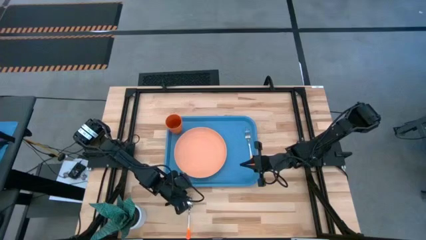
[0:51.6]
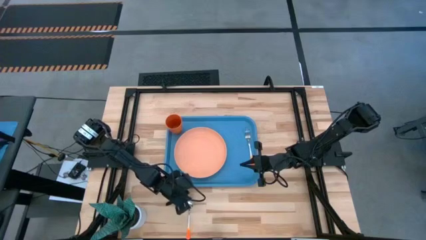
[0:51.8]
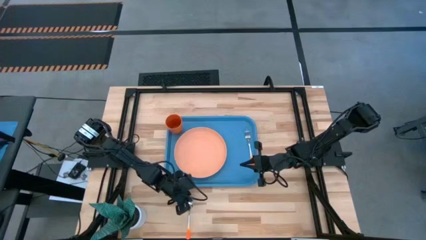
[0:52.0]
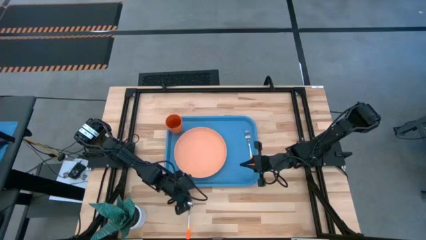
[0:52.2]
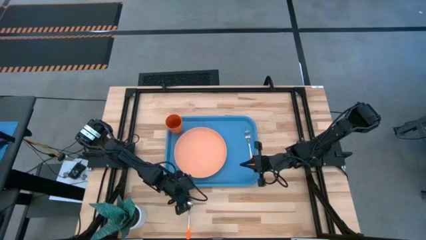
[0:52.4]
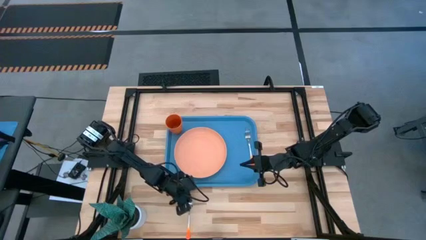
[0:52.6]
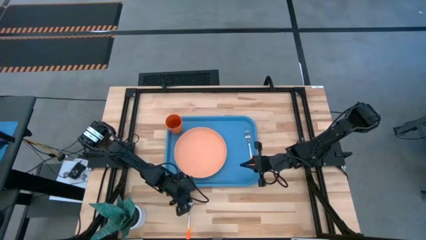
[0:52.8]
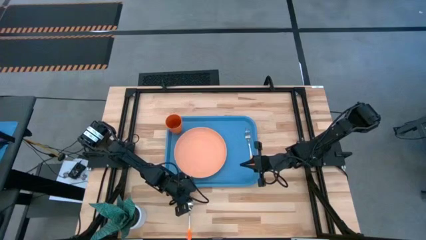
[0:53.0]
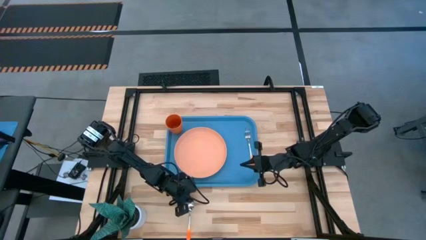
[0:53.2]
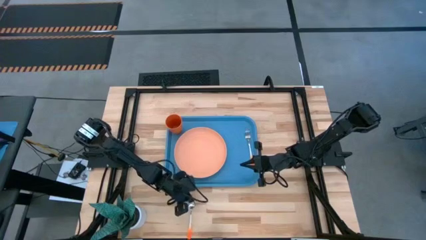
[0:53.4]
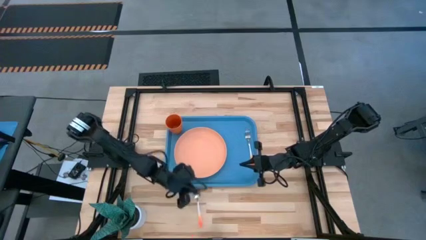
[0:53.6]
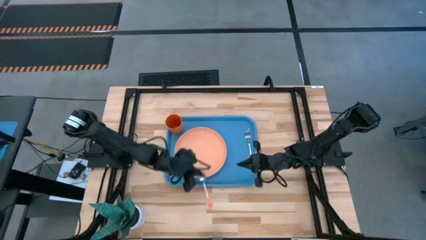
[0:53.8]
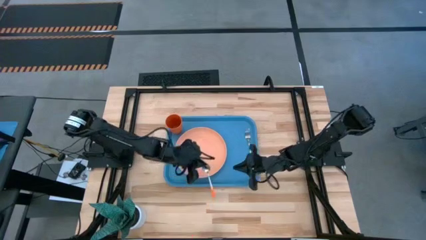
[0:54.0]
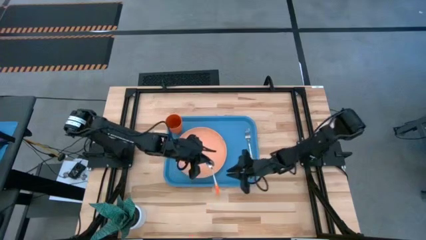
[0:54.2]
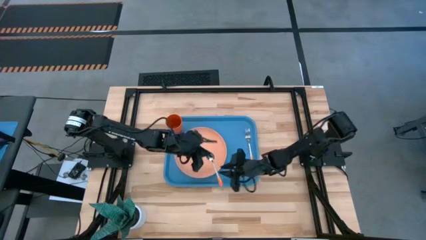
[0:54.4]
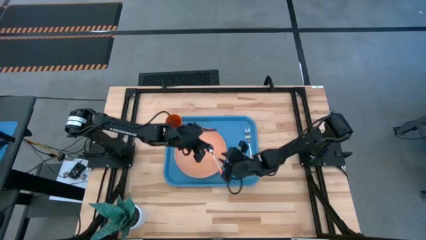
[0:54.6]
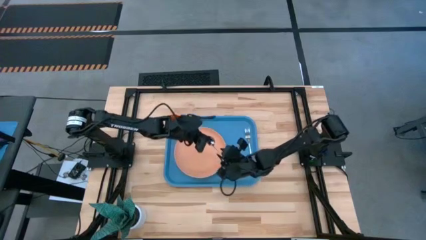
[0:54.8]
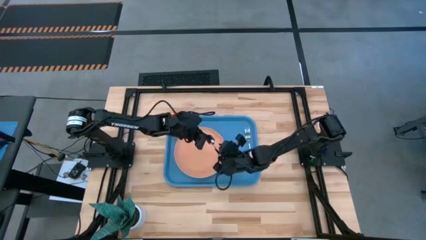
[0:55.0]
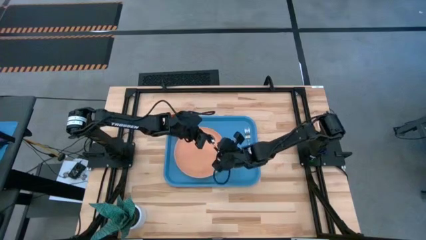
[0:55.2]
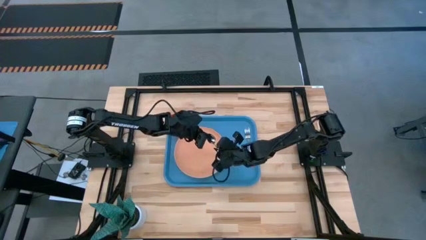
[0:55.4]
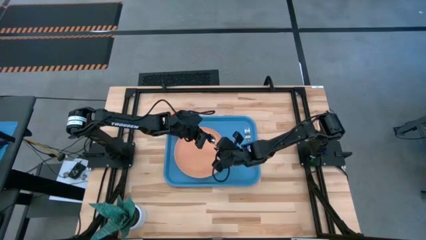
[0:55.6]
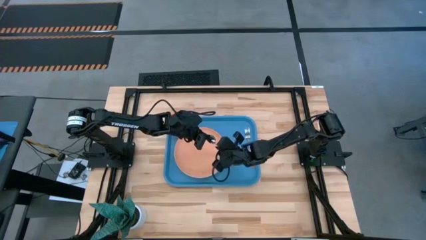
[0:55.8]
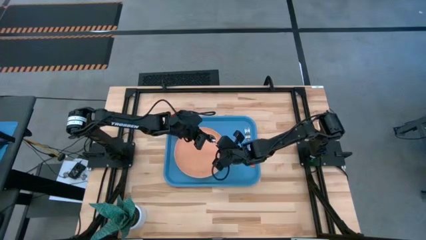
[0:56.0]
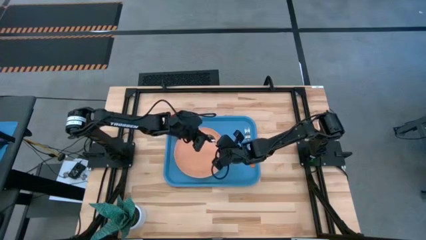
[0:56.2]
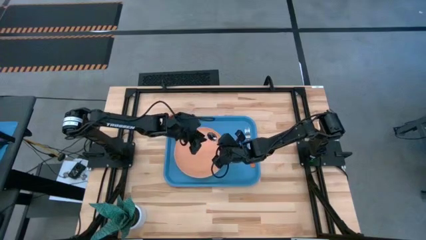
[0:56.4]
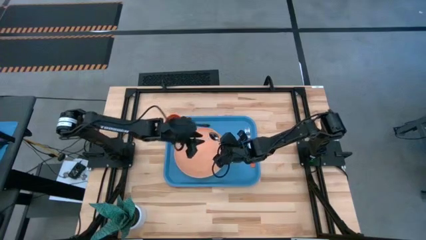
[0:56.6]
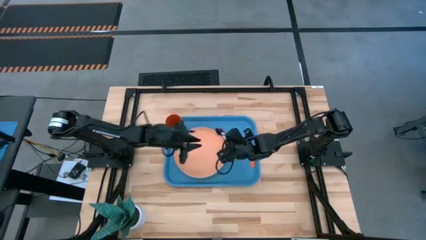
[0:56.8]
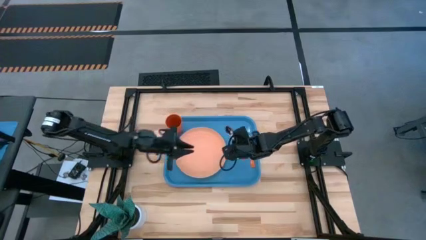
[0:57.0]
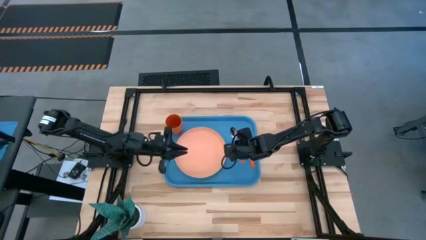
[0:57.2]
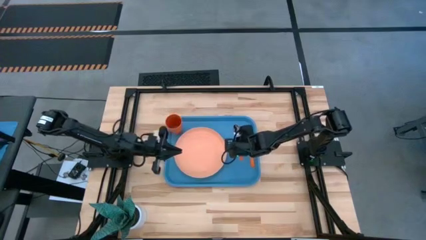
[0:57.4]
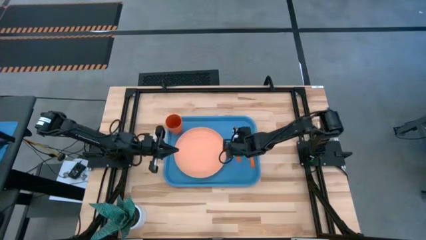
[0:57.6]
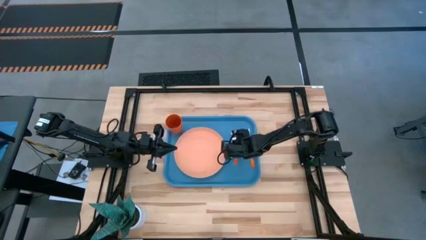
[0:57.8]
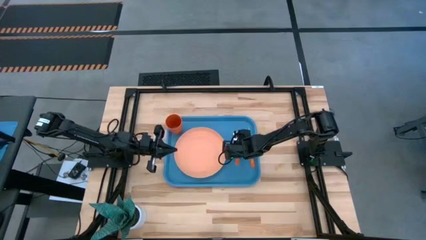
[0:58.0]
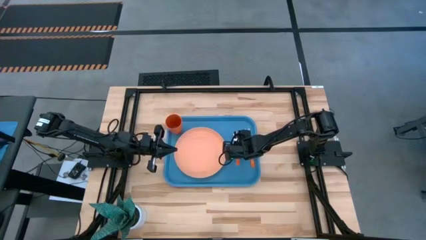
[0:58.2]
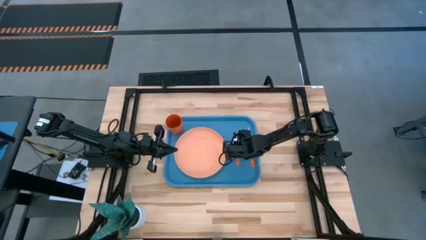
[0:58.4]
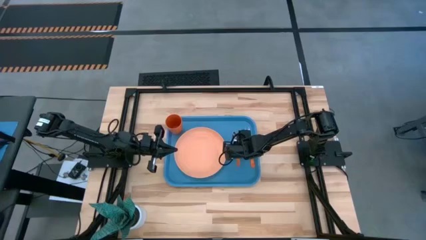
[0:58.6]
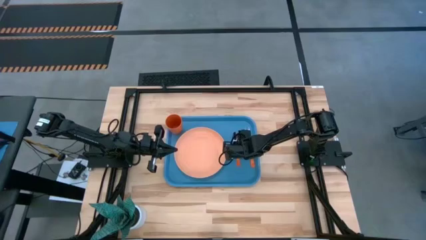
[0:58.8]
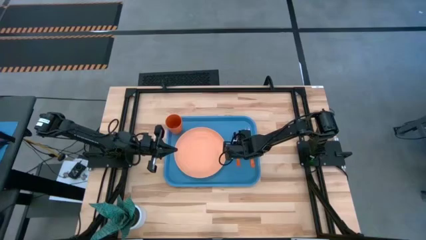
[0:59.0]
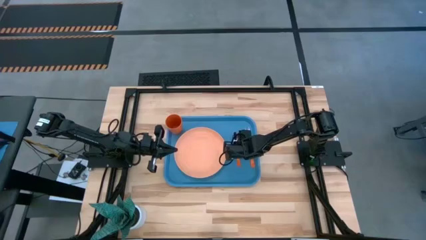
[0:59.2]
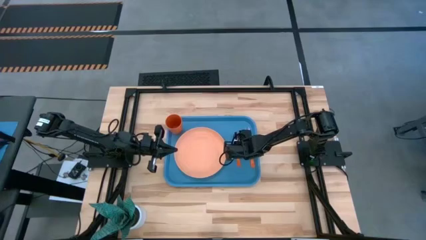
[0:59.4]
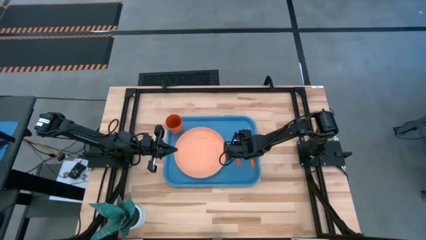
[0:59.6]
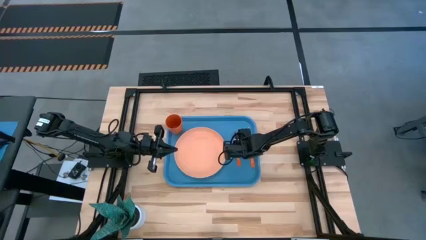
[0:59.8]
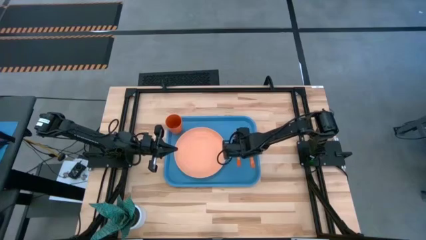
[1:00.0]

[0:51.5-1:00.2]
Task: Pick and place plate/cup/fork/spoon on tray
Put the orange spoon on the blue serving tray

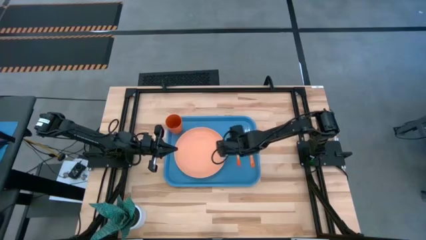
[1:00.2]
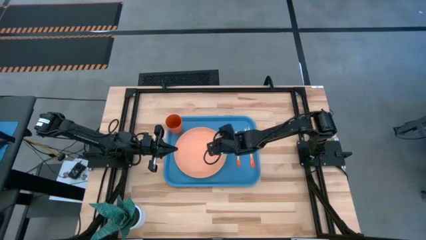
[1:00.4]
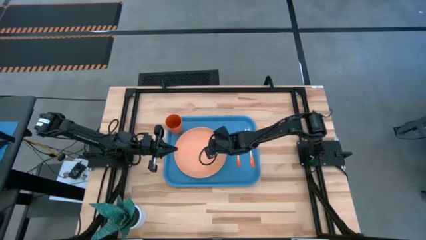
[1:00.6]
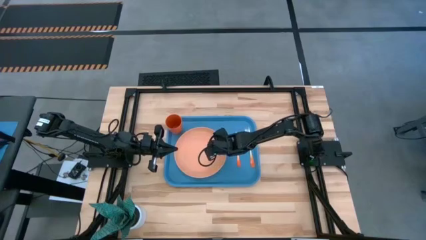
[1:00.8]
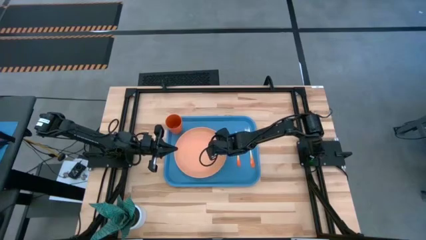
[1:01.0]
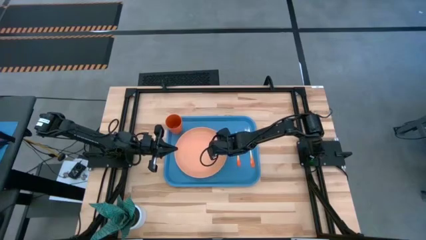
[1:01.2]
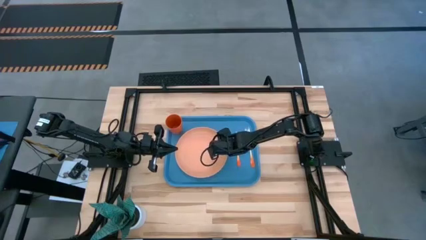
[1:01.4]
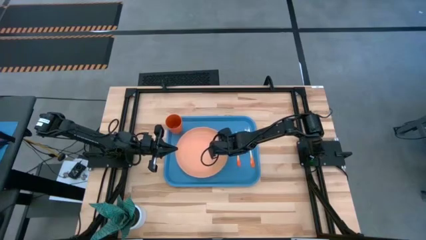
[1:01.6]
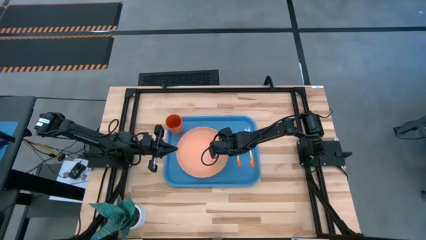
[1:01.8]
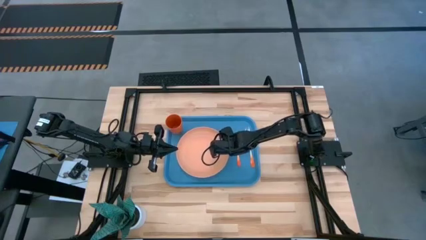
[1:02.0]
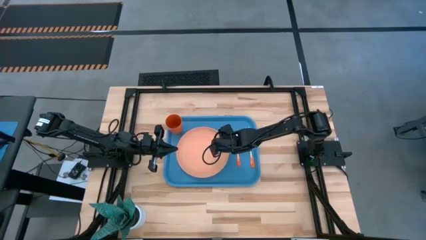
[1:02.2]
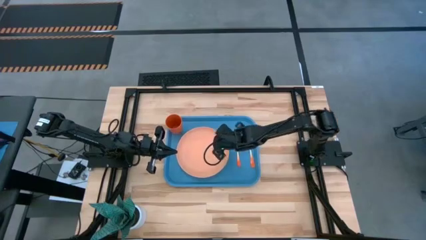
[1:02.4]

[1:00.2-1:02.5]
Adjust the orange plate

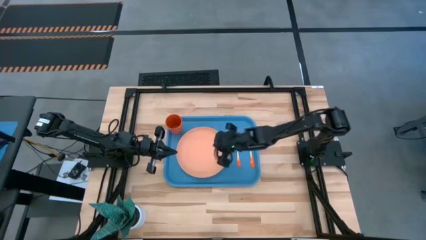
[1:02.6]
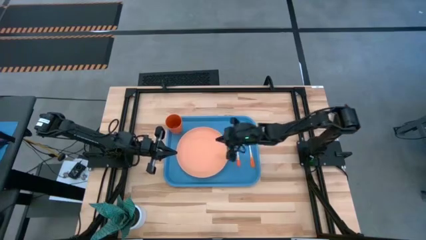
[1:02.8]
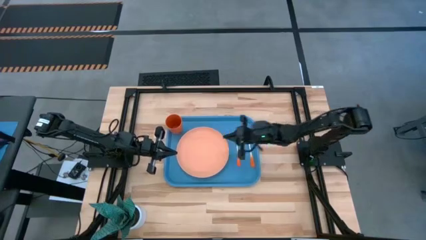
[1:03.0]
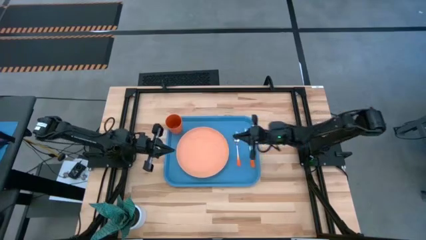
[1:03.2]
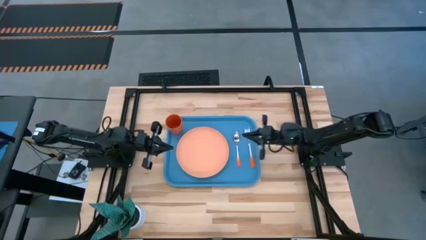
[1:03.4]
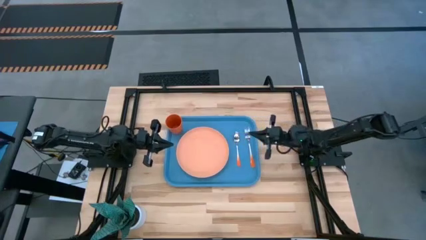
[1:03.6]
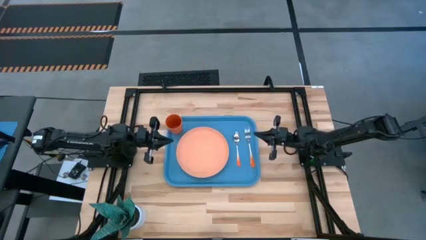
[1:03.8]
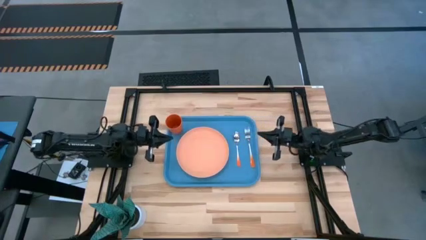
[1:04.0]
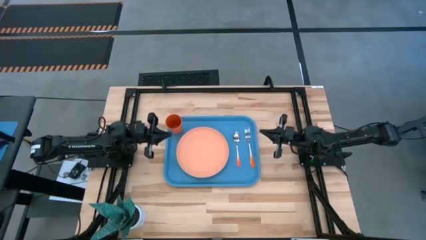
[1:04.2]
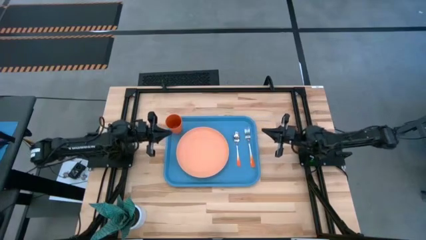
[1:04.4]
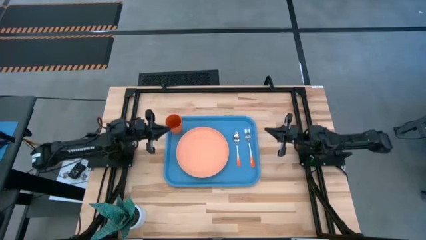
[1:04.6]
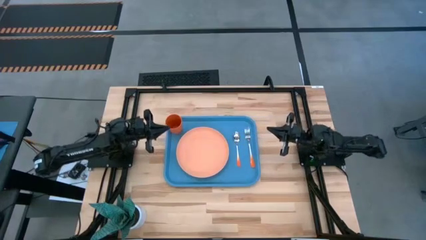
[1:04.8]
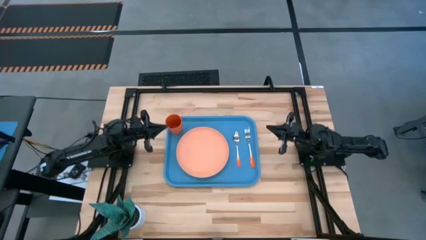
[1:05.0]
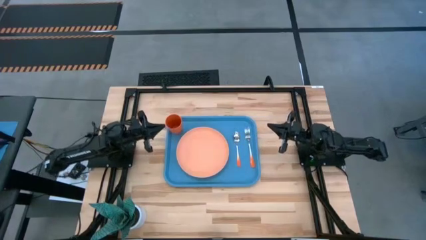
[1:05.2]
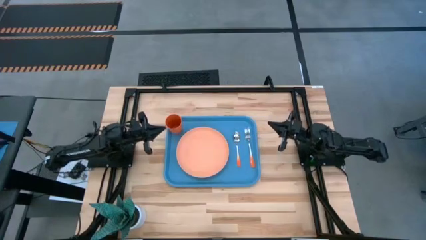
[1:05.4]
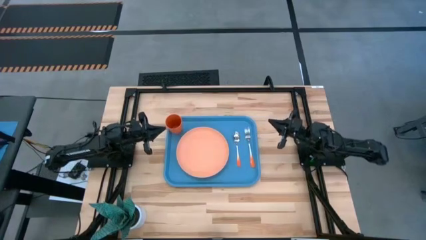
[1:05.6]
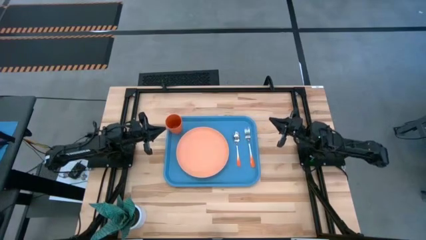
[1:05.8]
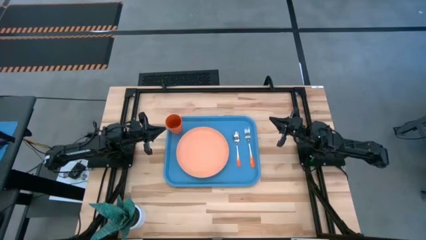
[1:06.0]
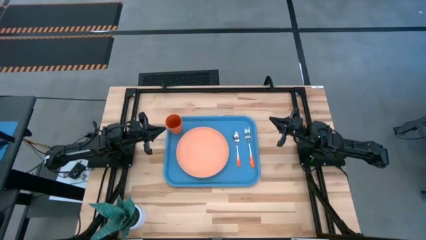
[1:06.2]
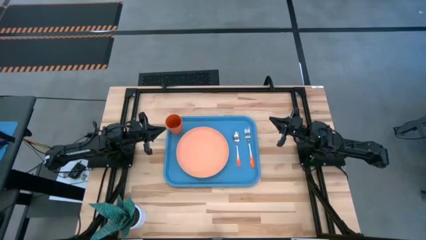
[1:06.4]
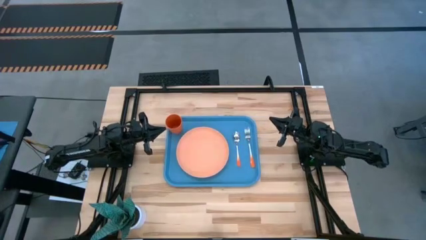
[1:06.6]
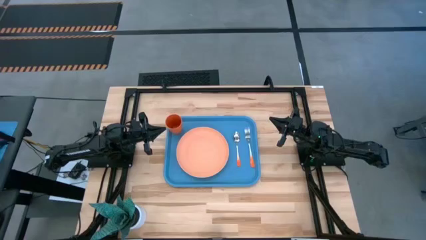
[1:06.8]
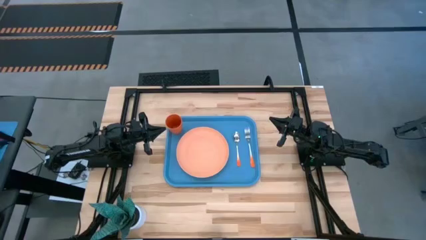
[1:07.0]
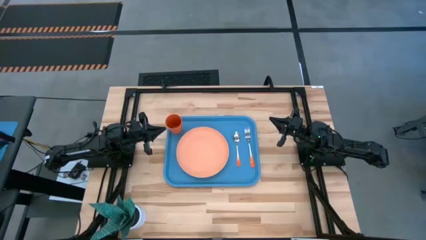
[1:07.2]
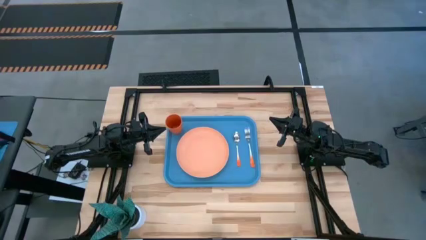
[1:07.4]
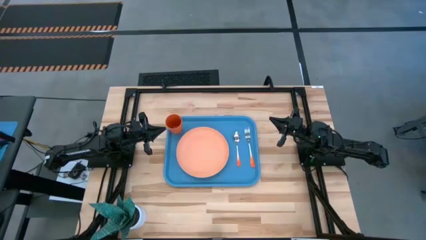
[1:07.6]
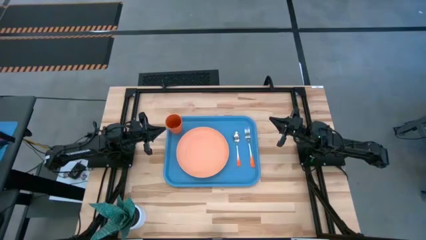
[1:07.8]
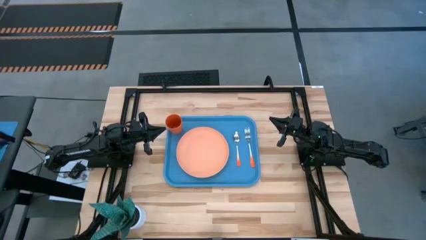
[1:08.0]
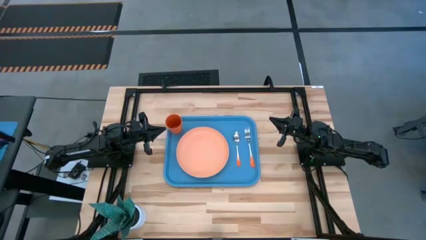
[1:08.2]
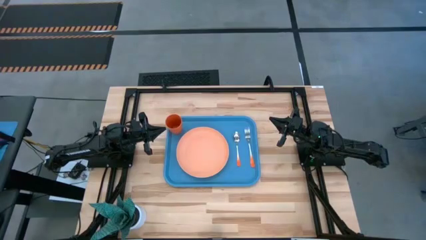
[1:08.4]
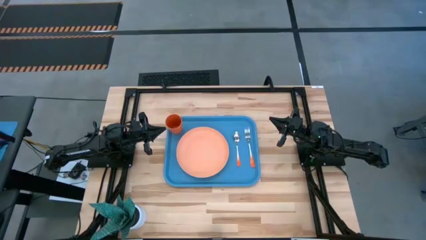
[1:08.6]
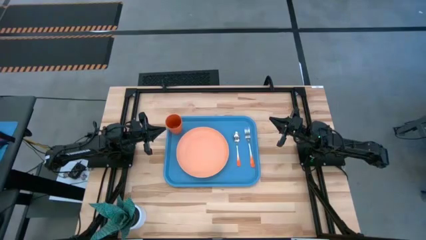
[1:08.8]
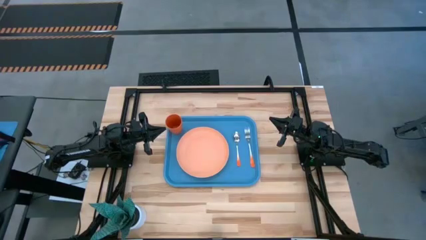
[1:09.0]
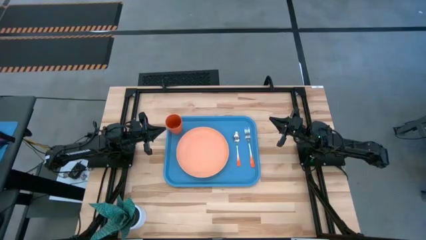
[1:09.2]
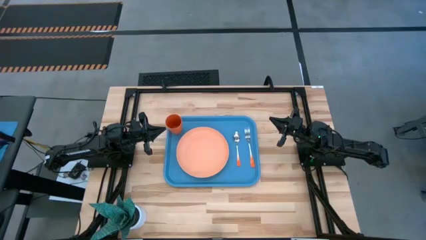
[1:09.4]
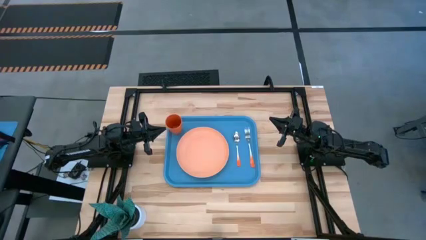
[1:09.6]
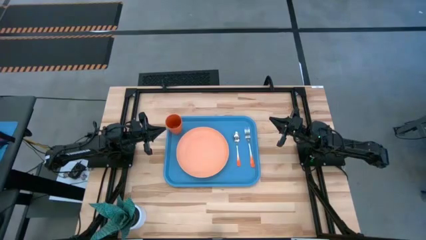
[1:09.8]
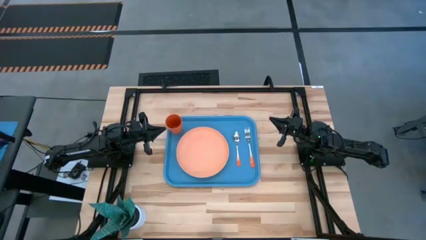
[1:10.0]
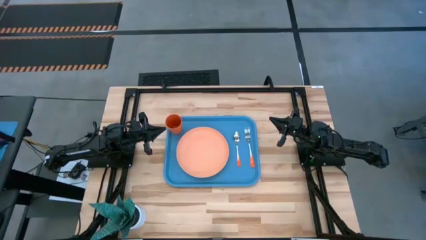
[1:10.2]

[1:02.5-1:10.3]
Return to Home Position
